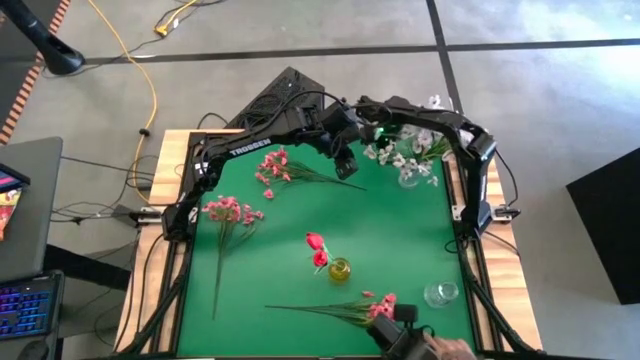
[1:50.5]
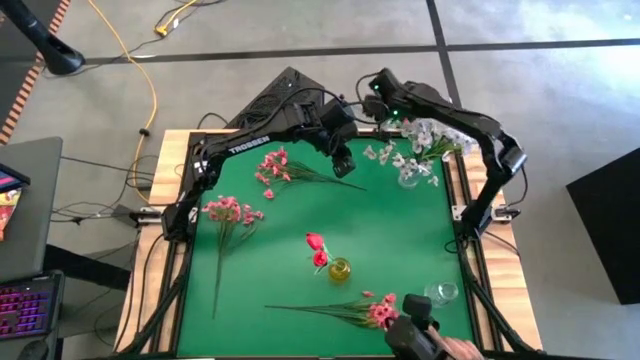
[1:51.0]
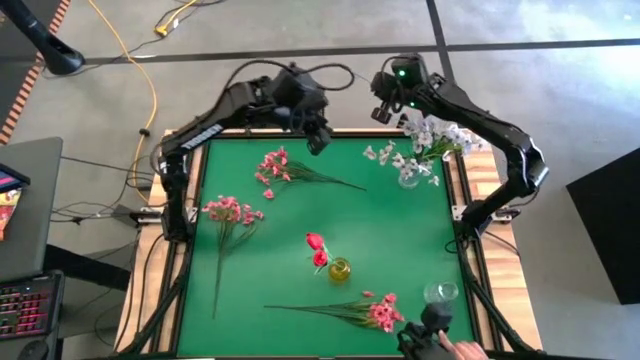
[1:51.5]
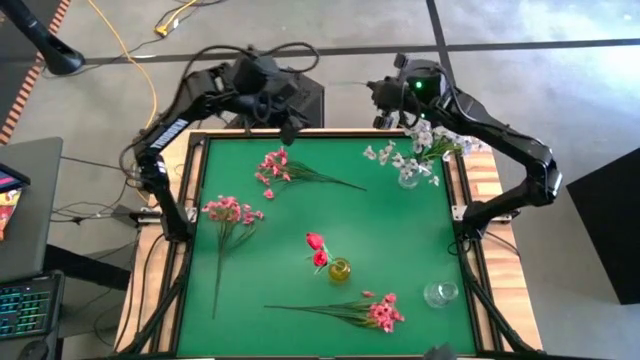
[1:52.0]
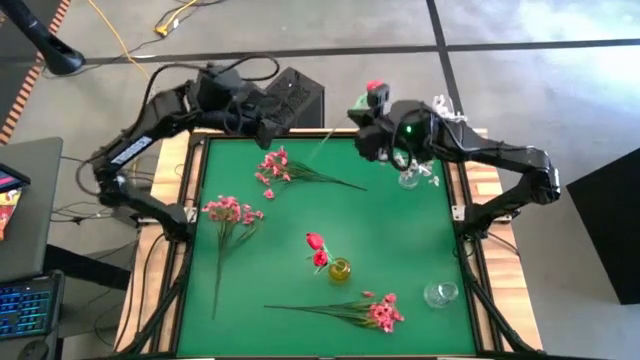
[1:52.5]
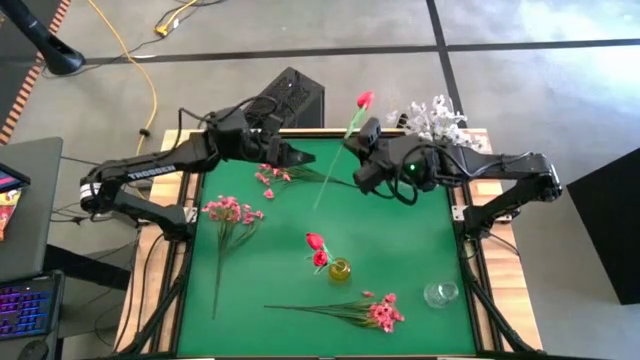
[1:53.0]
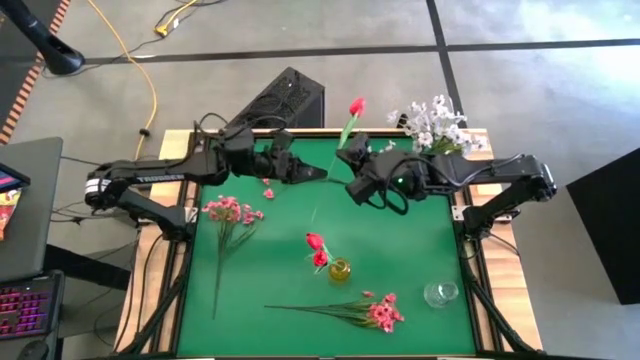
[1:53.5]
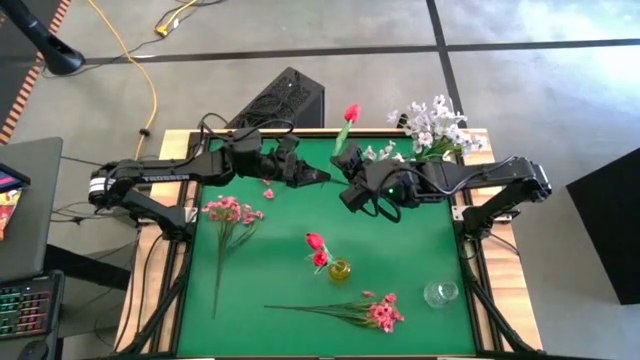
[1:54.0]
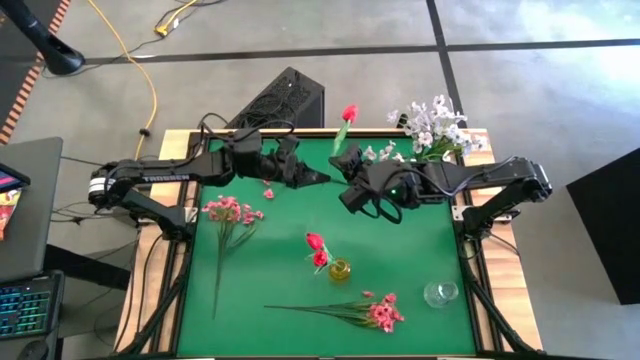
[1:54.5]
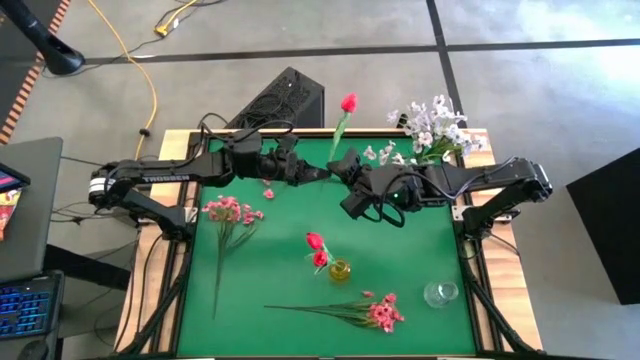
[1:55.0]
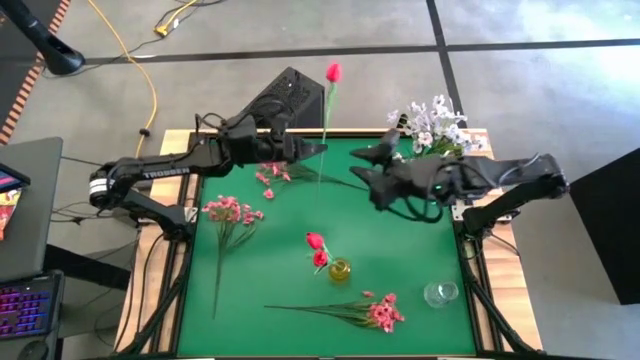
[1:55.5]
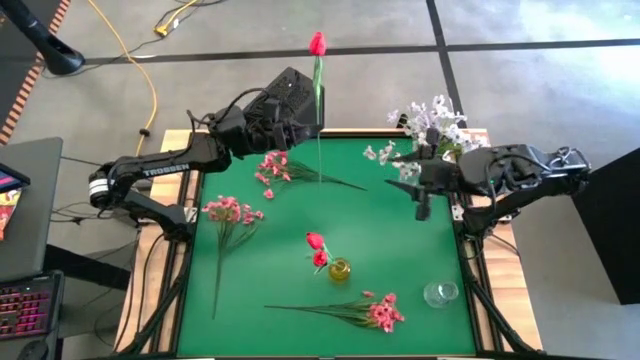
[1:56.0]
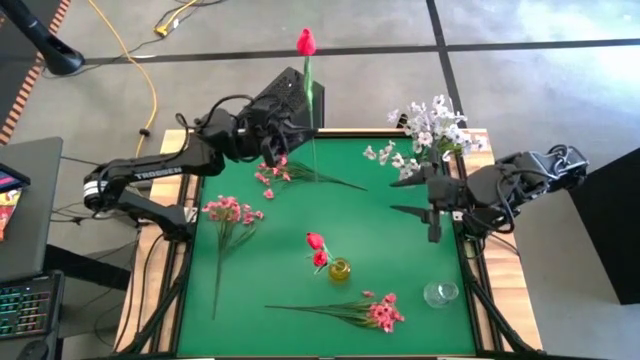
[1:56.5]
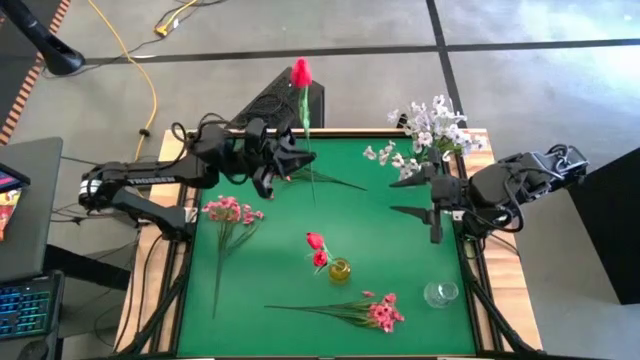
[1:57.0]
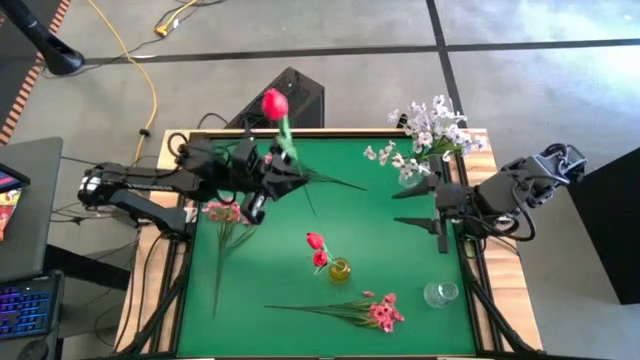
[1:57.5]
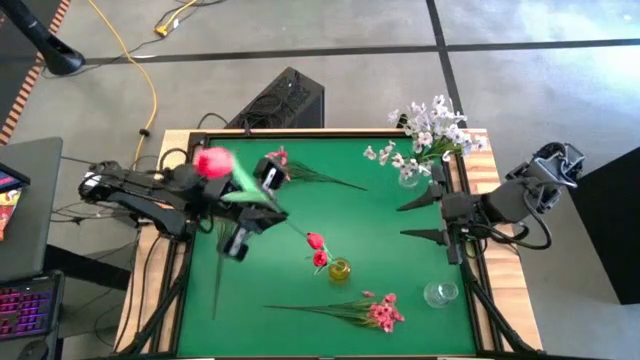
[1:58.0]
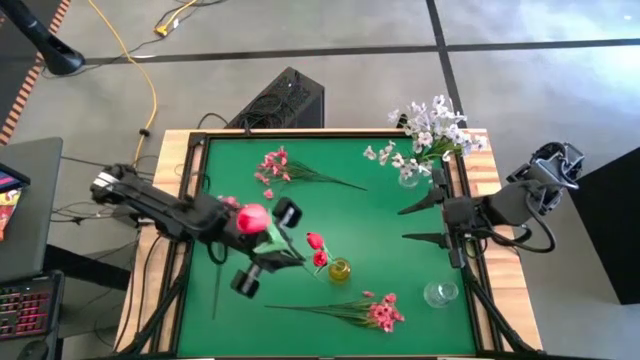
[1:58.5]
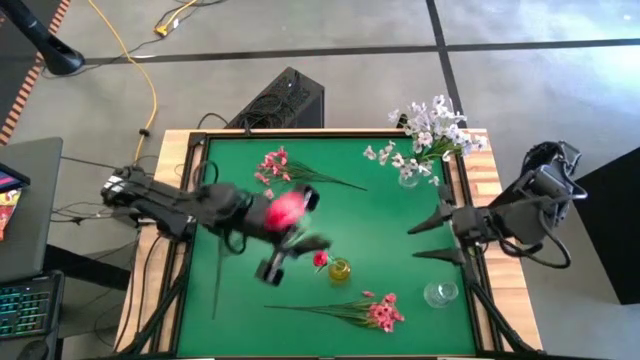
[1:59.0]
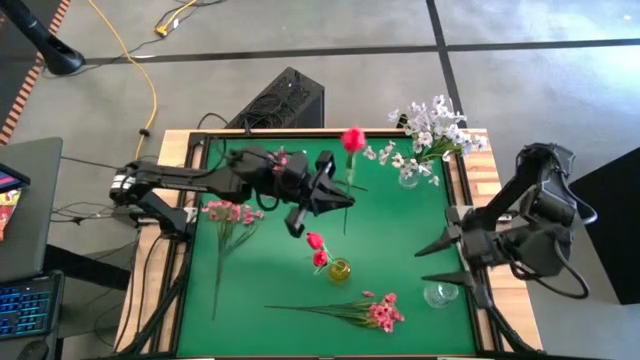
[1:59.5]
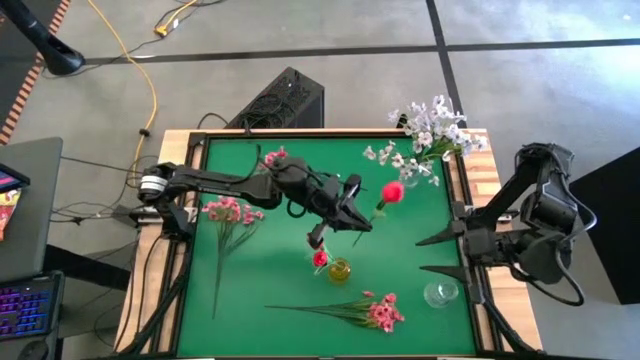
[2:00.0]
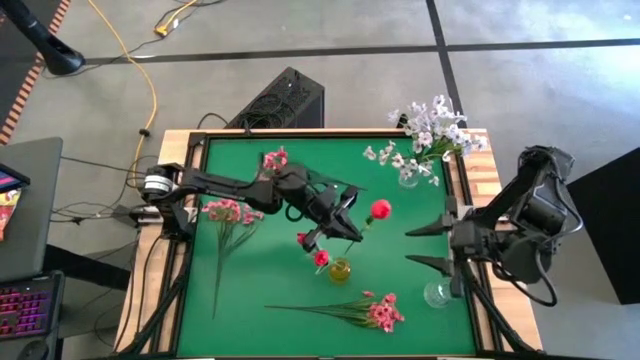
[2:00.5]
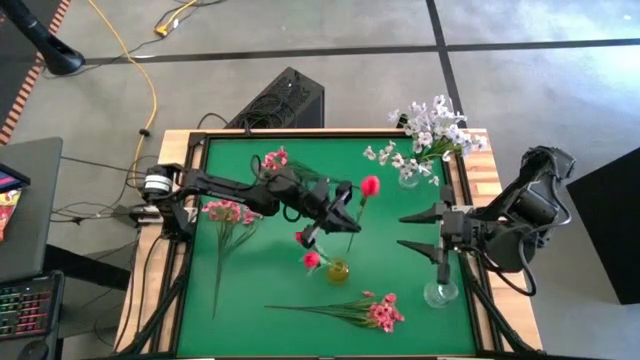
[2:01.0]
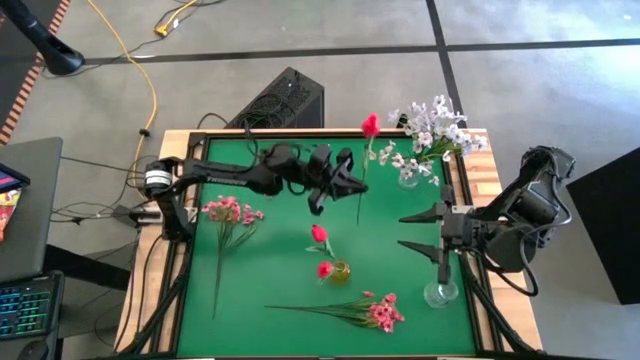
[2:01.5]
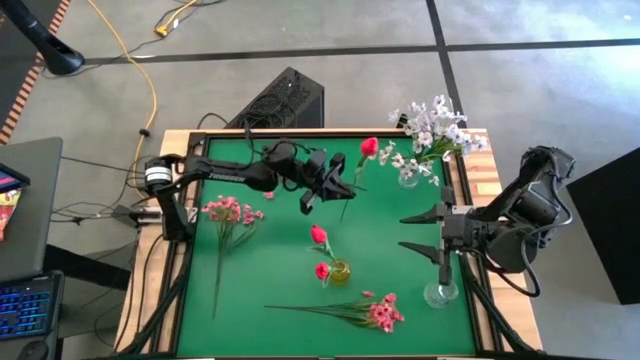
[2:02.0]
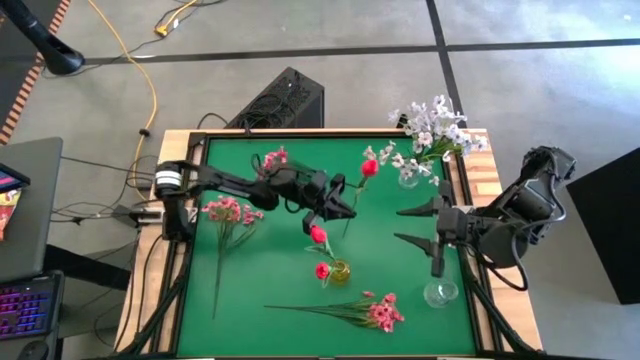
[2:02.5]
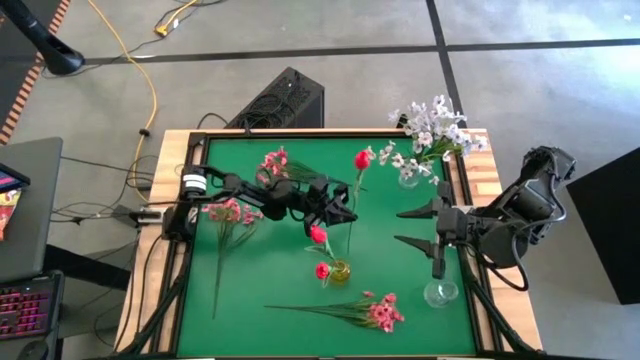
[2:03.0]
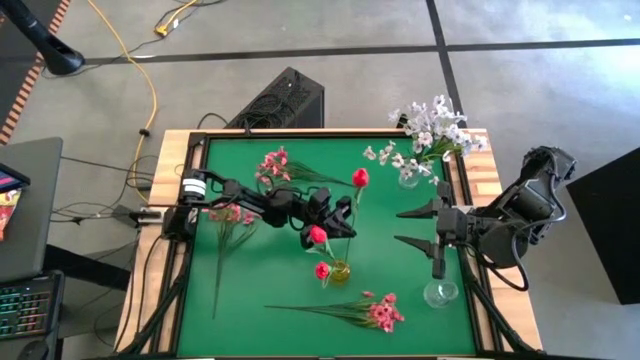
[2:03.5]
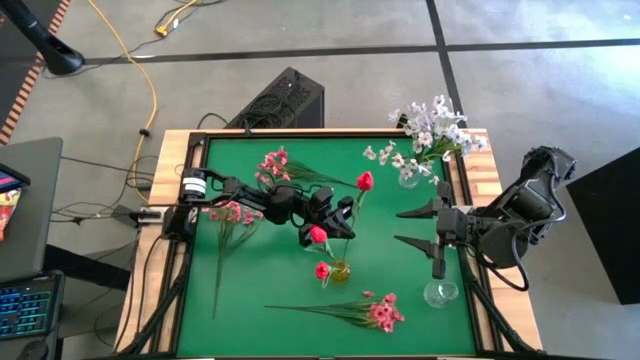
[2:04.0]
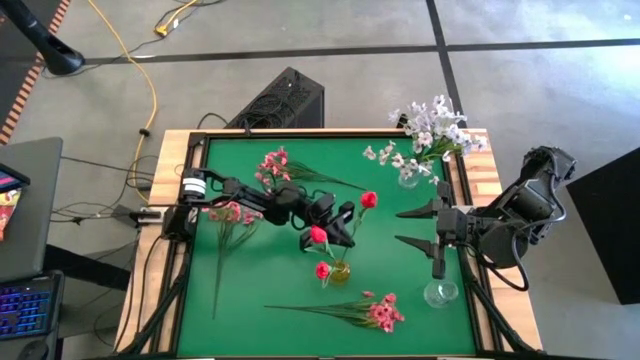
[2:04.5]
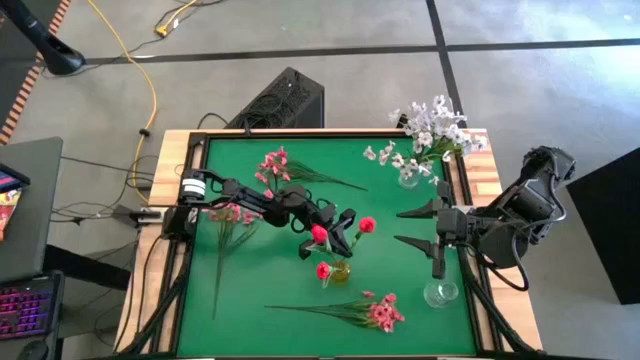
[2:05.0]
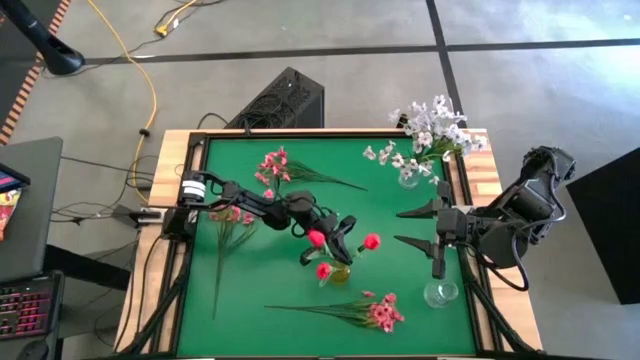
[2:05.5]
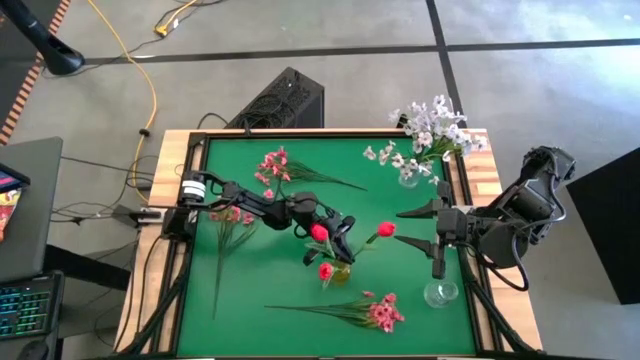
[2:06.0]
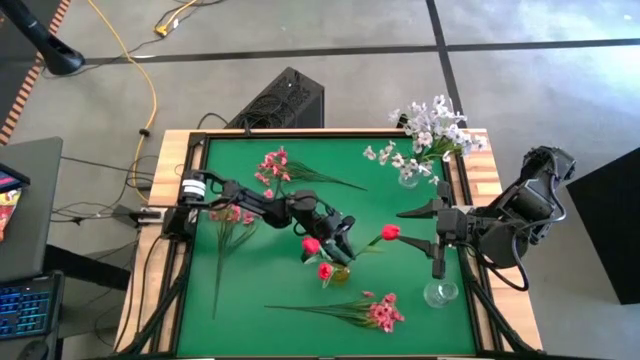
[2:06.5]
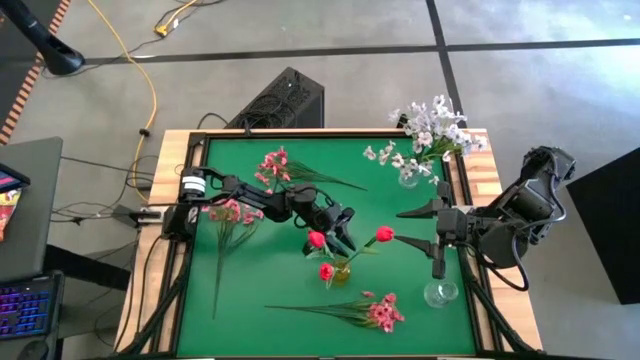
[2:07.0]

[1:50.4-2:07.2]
Task: Sort flowers into vase by color
Put the top right red tulip into the transparent yellow vase

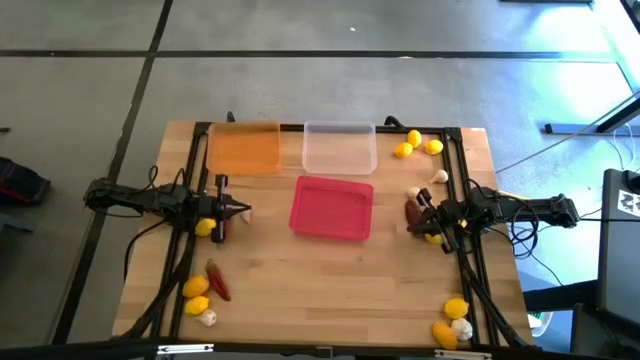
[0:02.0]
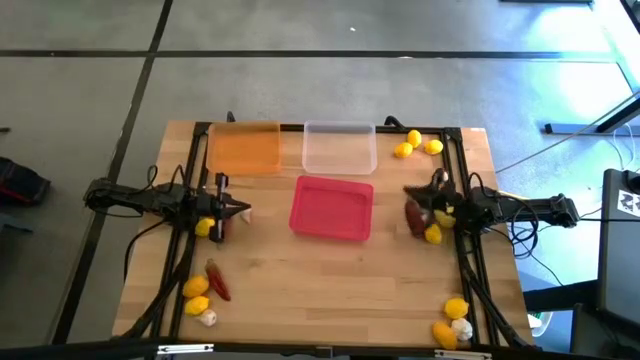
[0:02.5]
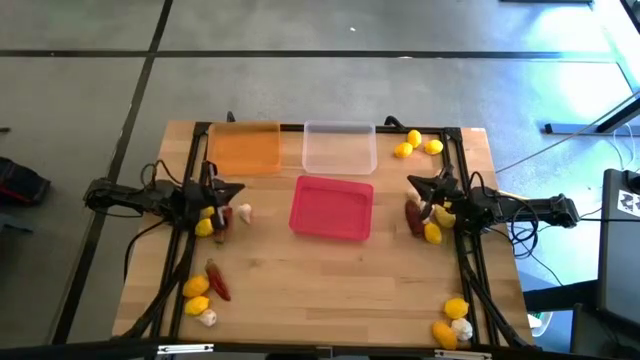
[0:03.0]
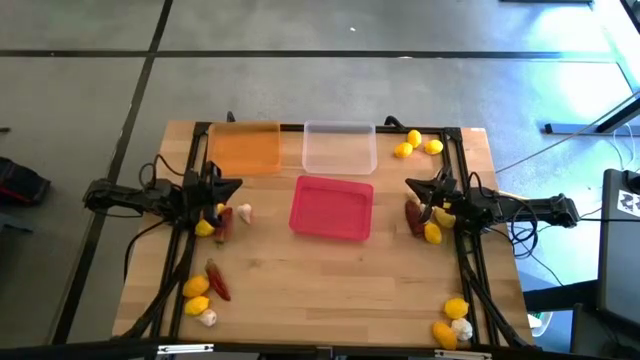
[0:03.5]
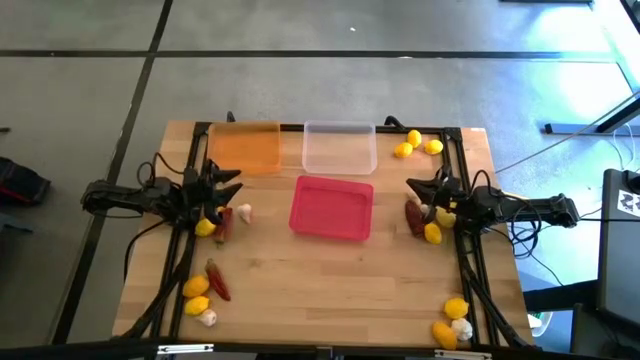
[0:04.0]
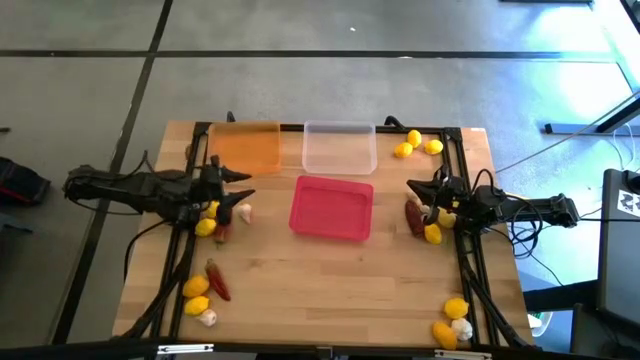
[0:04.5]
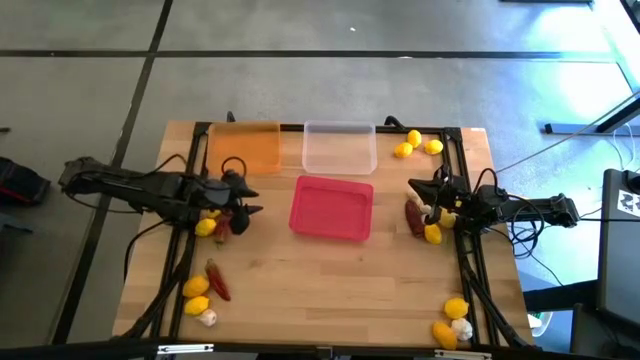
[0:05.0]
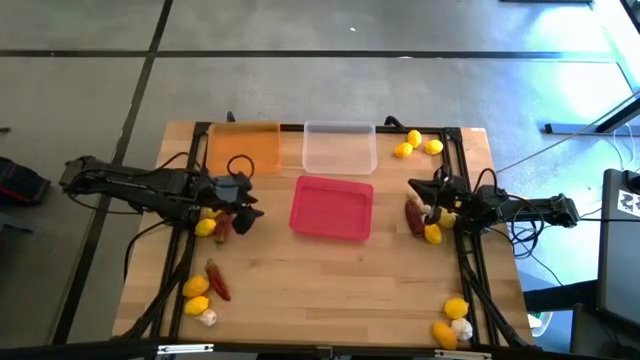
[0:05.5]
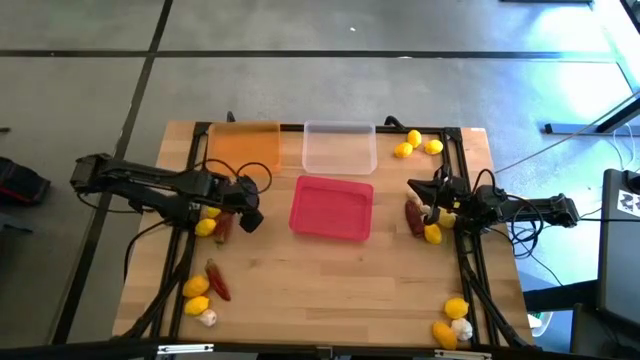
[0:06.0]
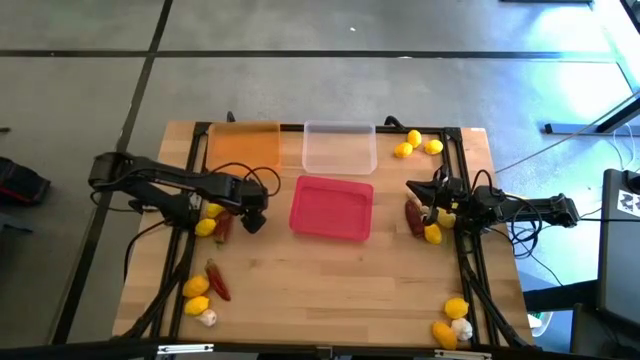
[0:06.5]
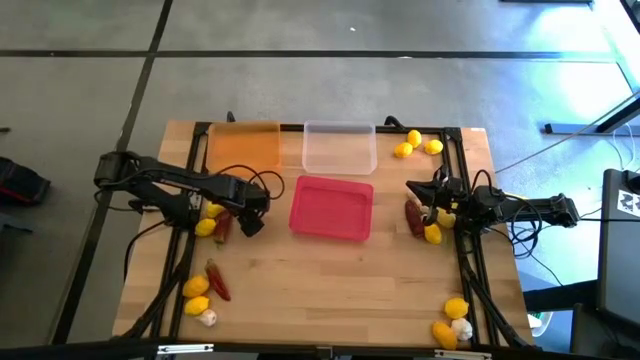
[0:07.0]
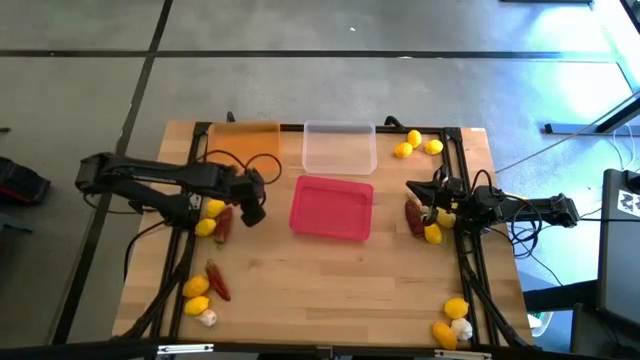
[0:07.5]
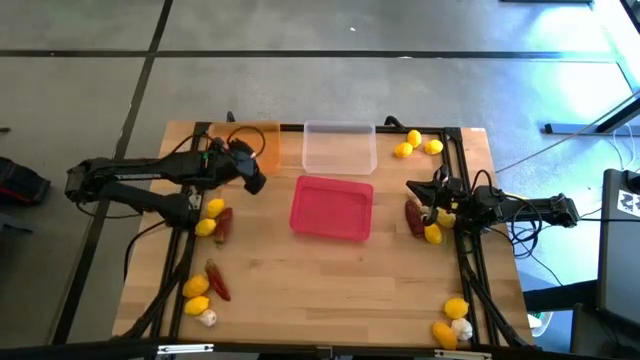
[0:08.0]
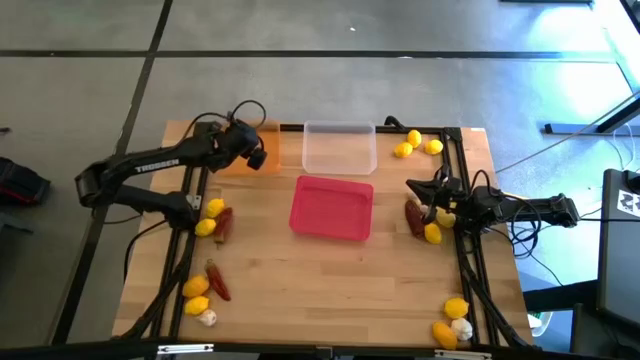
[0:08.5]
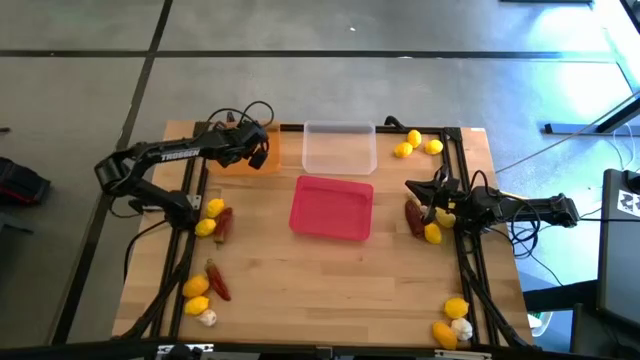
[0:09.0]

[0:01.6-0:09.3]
Task: Sort produce into baskets
Put the white garlic in the orange bin
